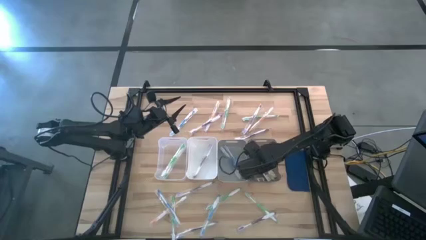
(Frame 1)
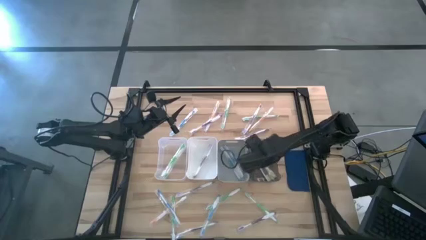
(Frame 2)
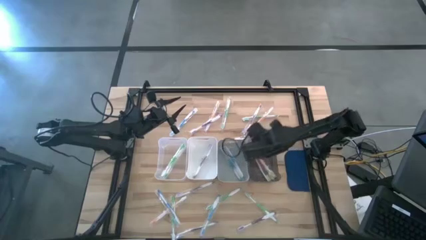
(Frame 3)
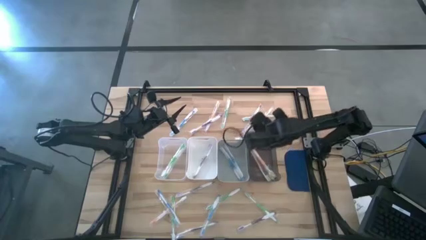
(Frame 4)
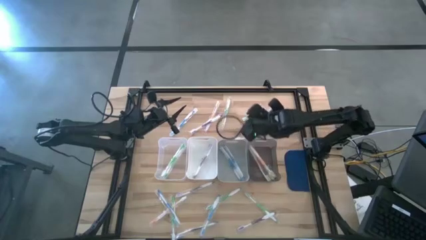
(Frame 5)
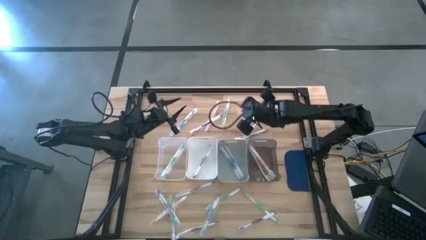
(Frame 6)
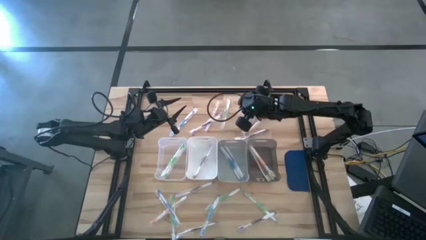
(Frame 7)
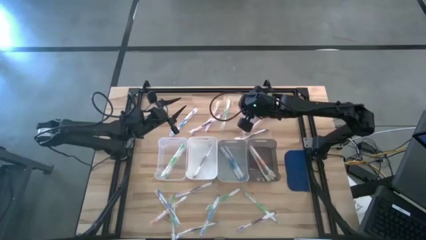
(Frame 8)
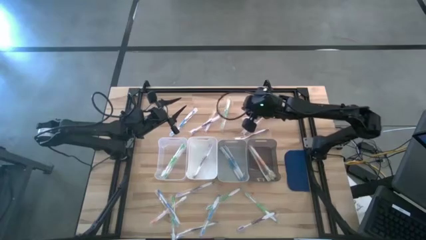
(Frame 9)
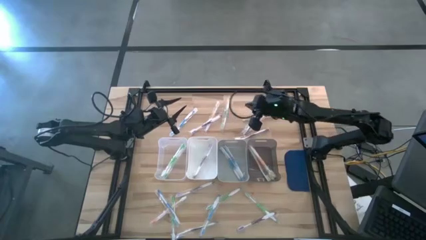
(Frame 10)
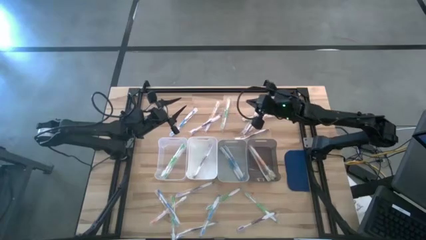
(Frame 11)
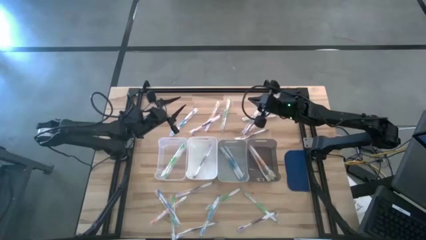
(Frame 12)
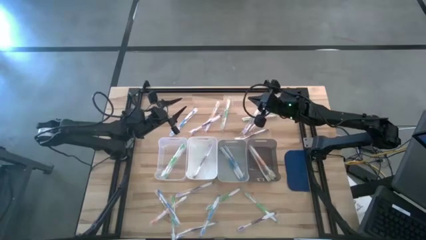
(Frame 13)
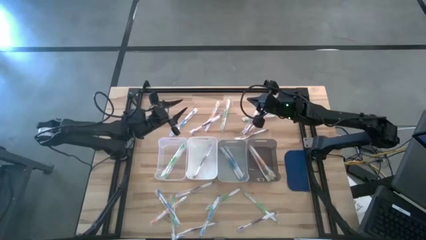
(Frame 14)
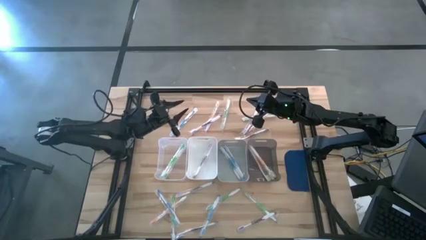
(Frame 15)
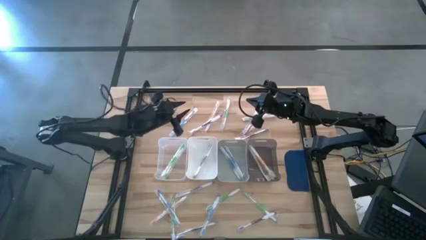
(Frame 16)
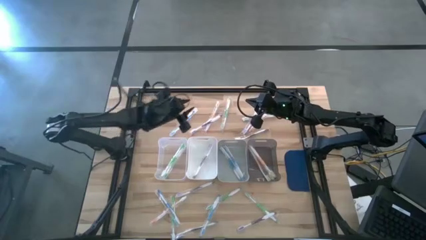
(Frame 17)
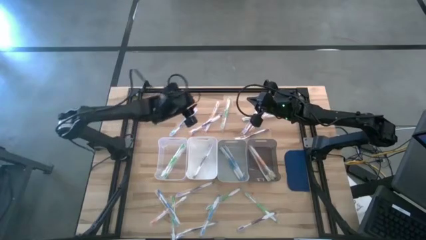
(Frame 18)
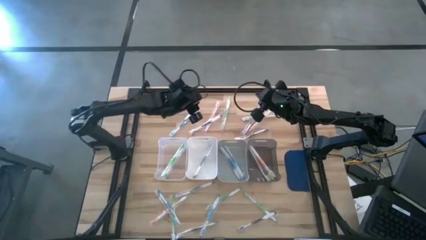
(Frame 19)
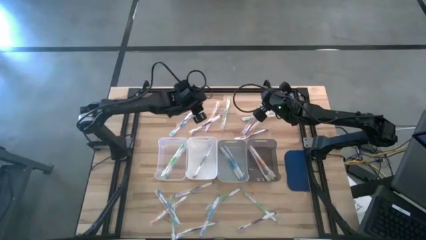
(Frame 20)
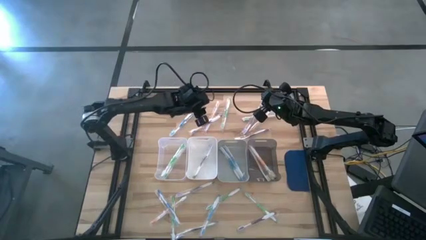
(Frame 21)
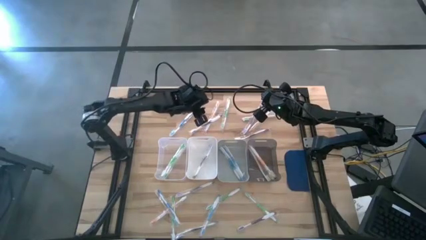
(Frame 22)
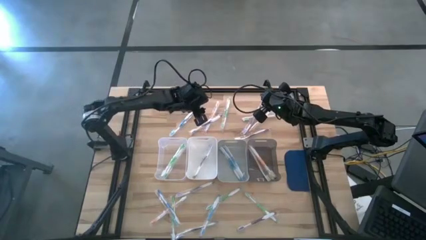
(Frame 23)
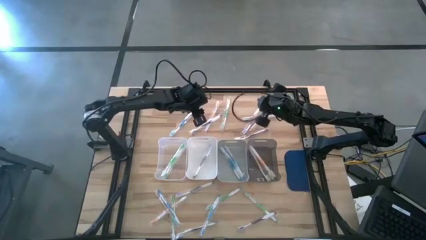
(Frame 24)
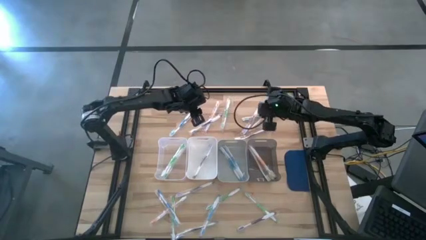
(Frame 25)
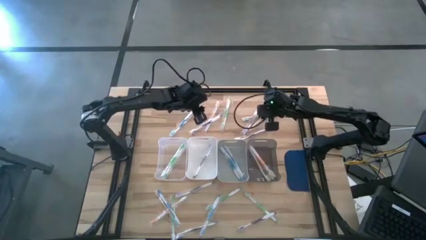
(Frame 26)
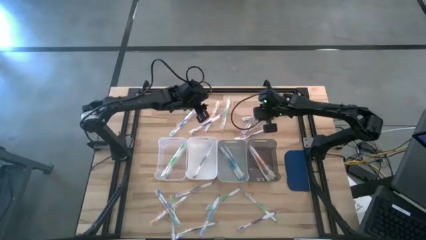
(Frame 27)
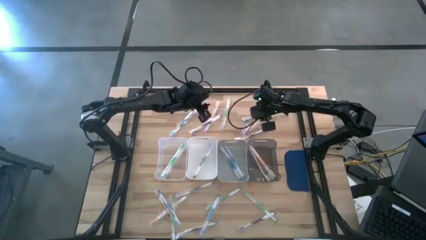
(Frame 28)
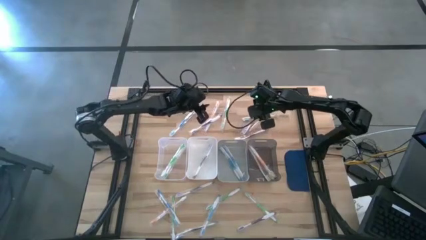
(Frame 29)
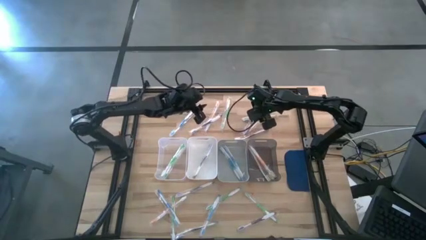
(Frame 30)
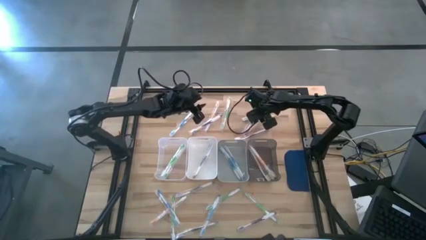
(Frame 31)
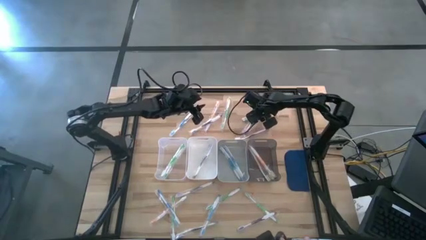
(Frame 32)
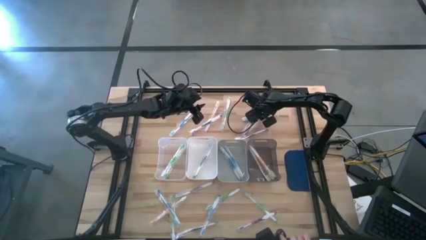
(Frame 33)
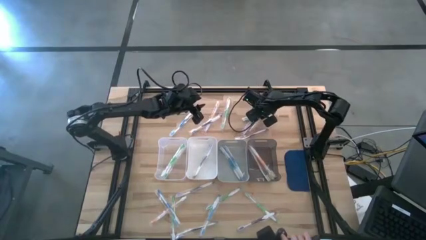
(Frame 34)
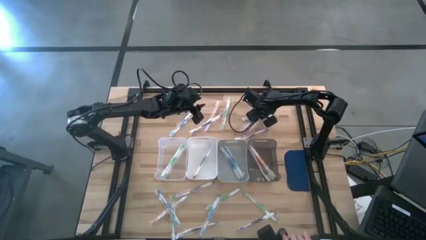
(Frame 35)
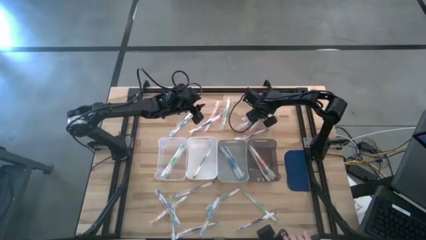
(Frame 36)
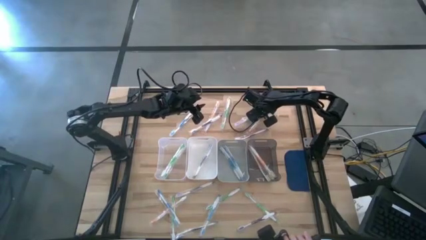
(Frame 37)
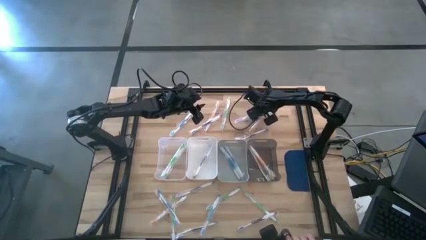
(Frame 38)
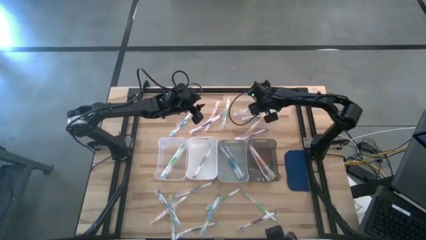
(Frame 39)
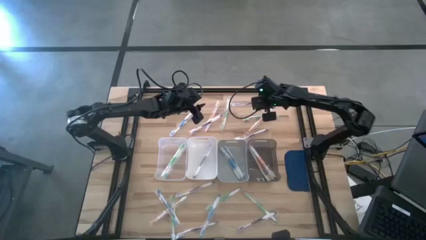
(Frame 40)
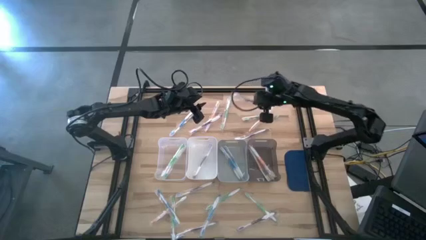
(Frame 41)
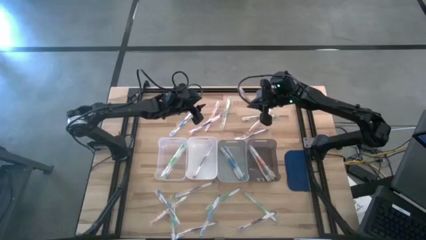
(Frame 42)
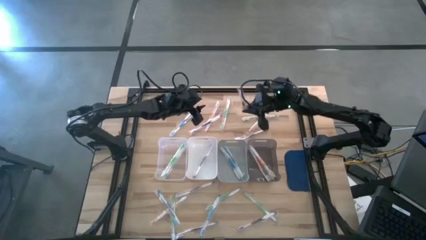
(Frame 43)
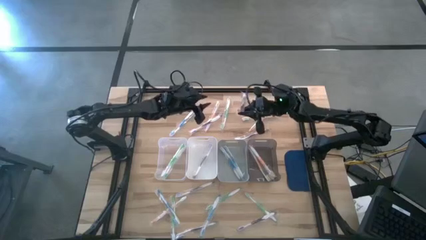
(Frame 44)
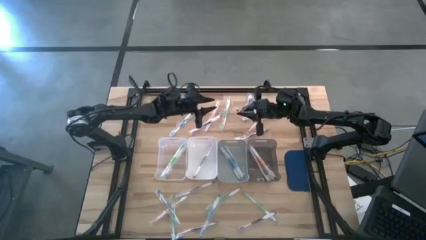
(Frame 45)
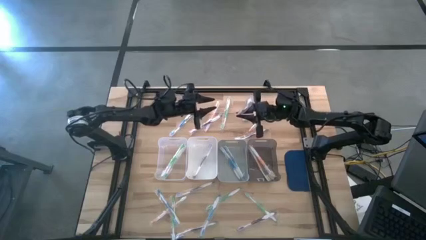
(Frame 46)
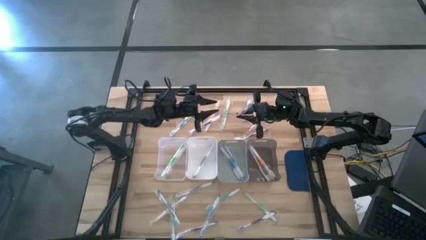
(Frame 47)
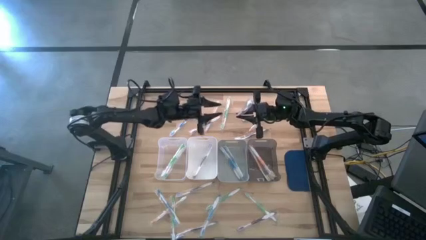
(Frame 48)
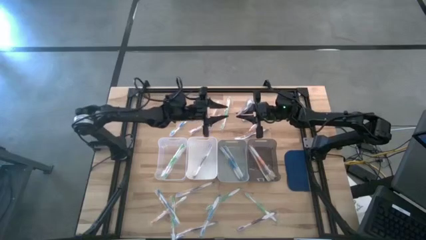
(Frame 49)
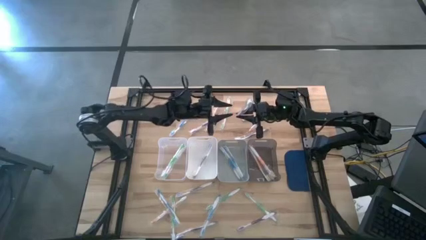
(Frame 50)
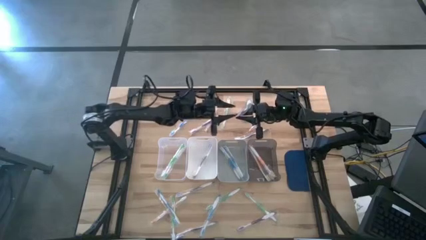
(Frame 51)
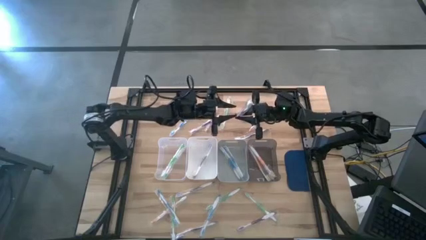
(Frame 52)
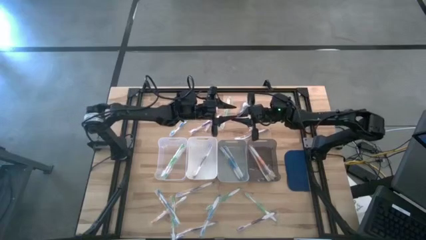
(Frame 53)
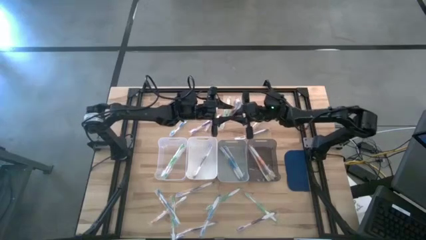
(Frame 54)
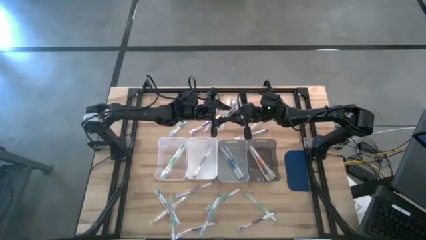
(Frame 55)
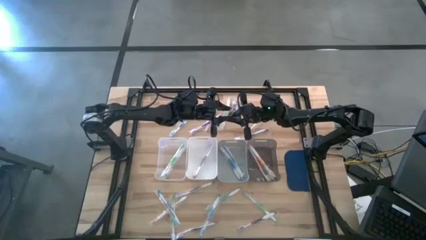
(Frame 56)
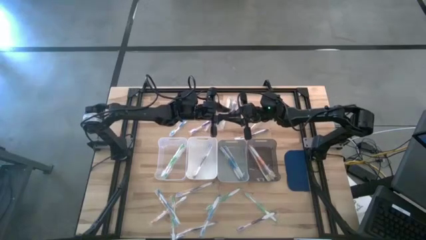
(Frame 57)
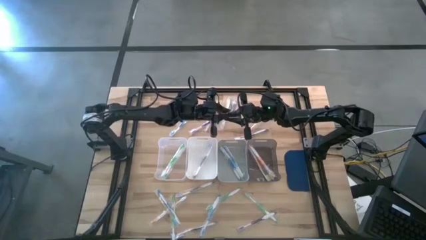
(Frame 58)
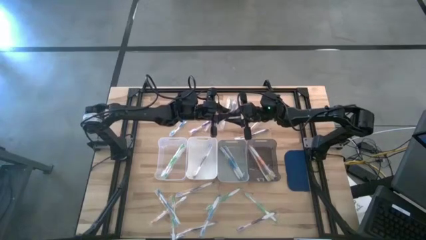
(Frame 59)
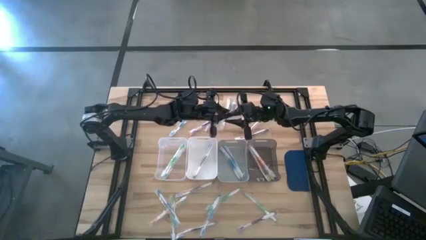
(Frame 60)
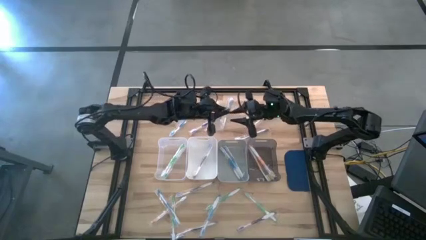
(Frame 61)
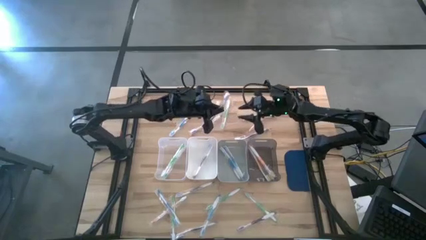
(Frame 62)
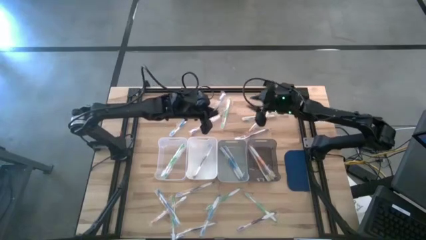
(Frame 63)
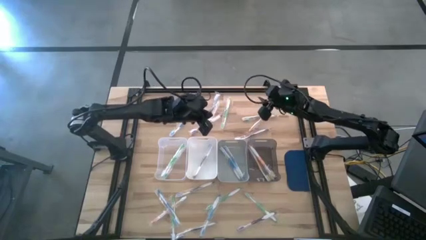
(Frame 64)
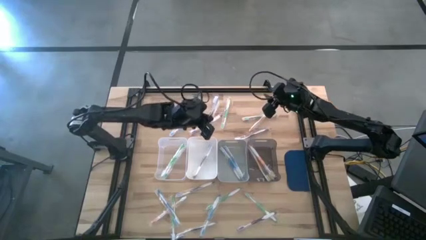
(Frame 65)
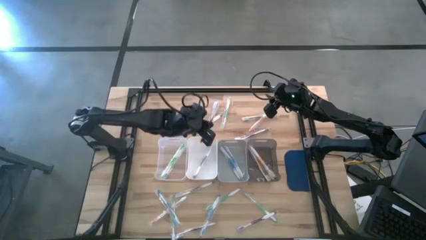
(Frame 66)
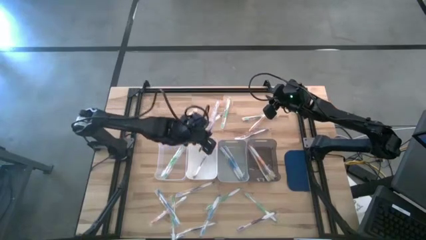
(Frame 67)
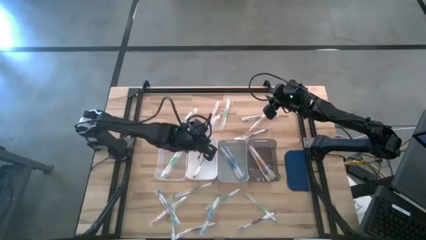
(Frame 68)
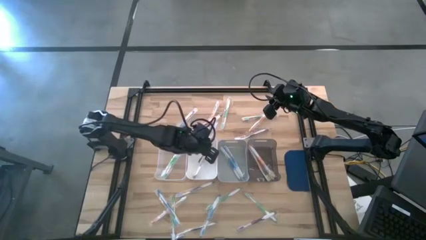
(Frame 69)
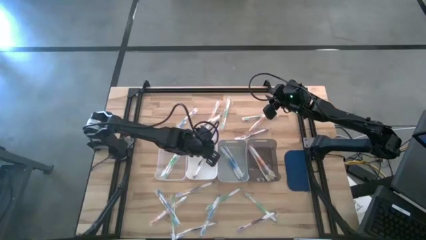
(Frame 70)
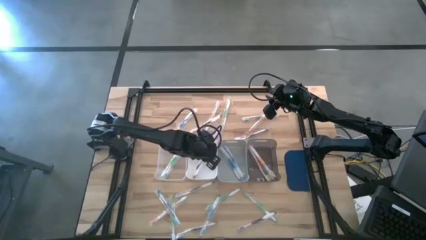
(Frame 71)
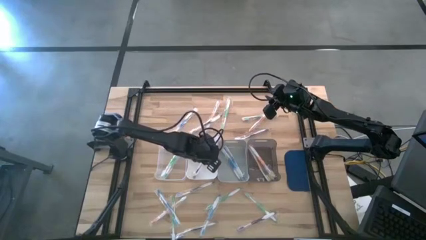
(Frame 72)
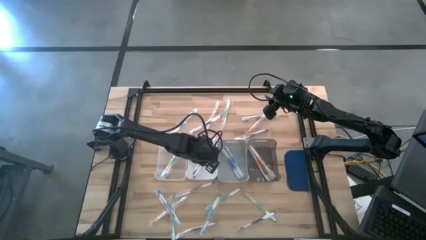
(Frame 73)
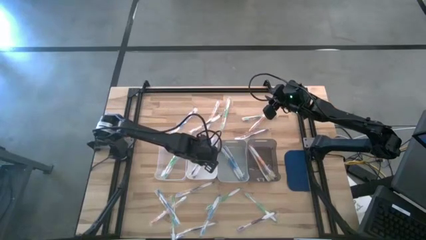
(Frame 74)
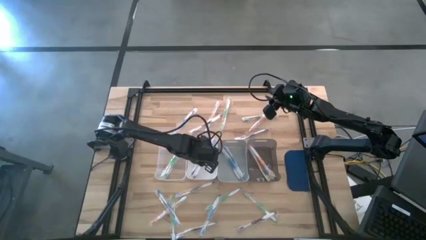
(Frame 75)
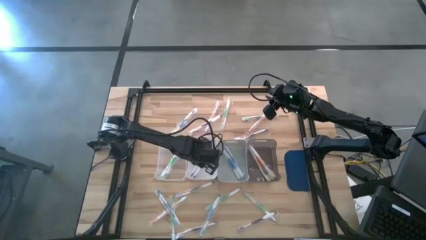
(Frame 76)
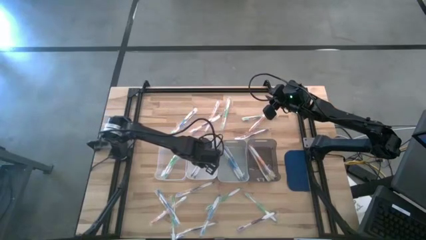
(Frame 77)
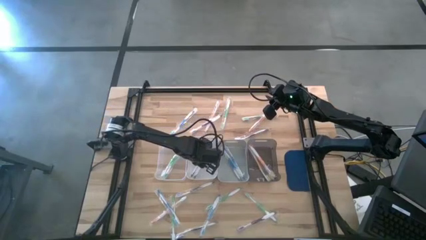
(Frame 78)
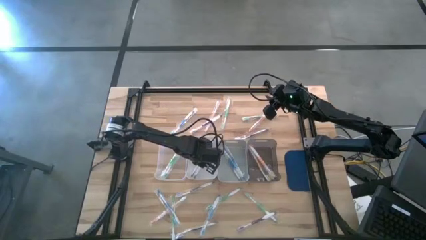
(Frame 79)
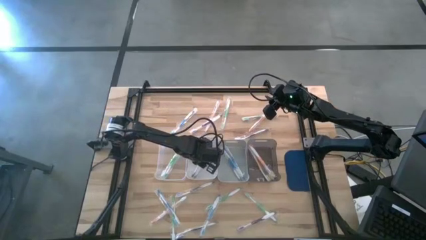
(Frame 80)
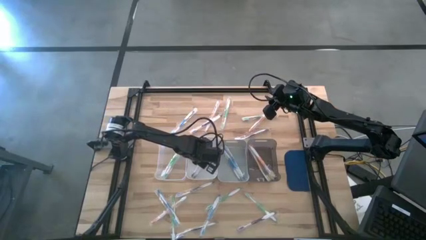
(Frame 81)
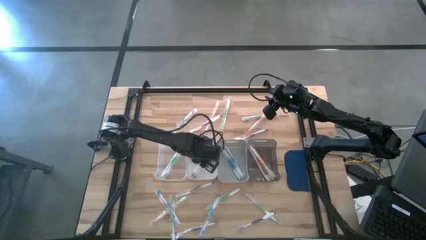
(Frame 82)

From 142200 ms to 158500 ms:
Task: Pick & Place Toothbrushes
Put the purple toothbrush into the white bin
